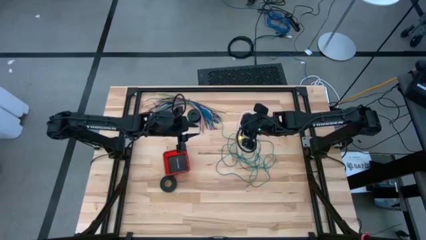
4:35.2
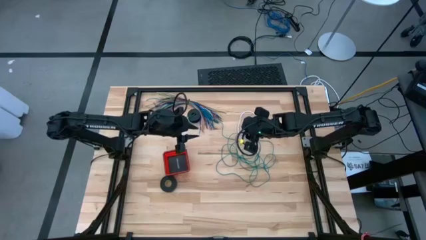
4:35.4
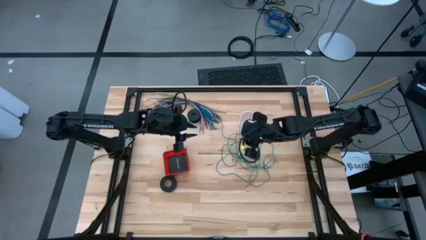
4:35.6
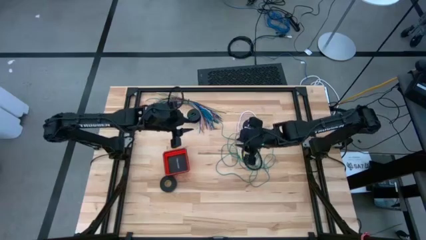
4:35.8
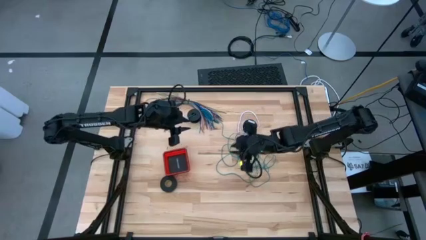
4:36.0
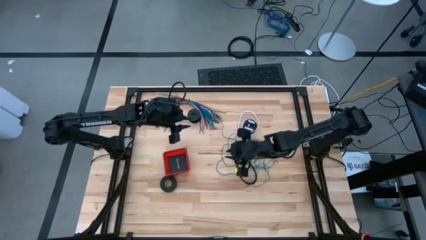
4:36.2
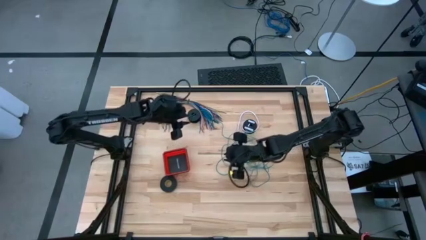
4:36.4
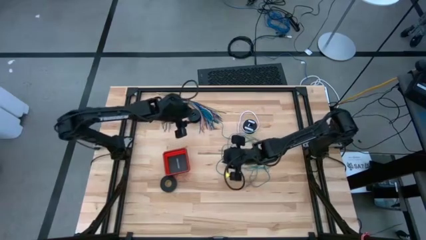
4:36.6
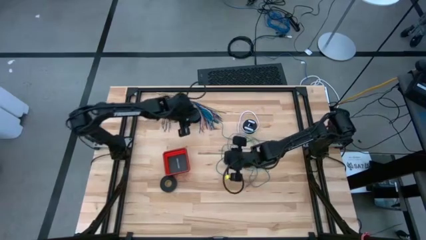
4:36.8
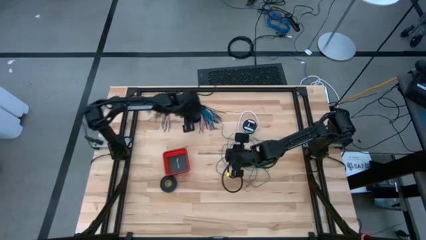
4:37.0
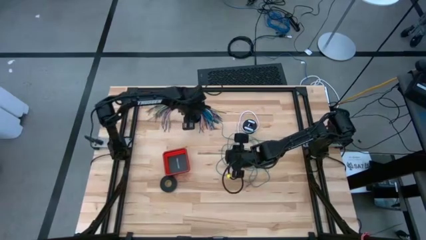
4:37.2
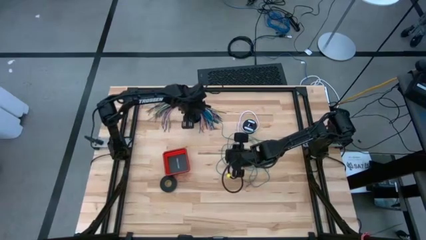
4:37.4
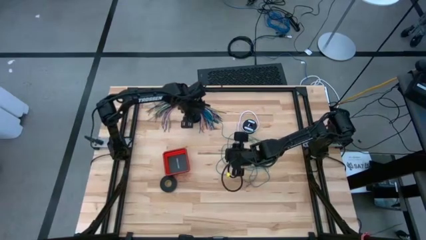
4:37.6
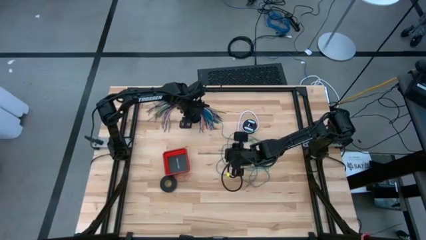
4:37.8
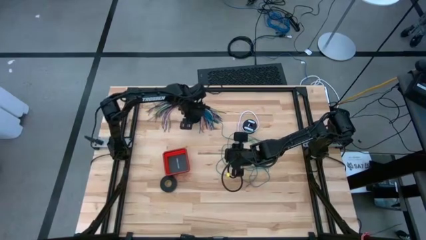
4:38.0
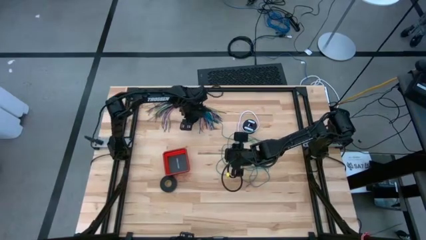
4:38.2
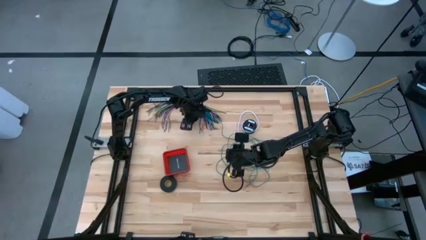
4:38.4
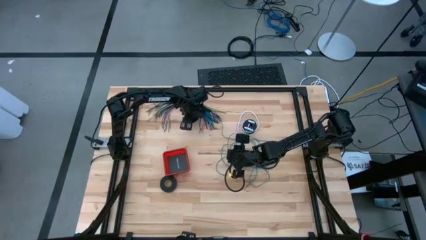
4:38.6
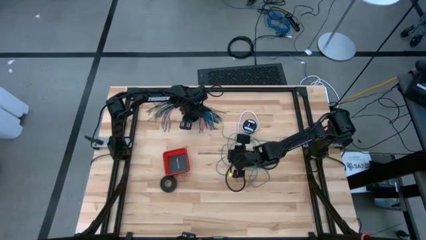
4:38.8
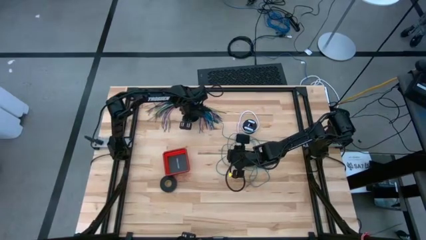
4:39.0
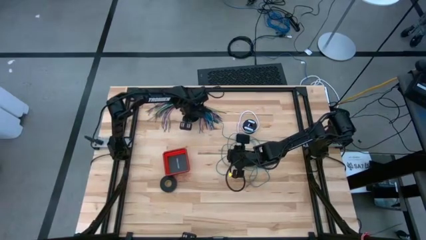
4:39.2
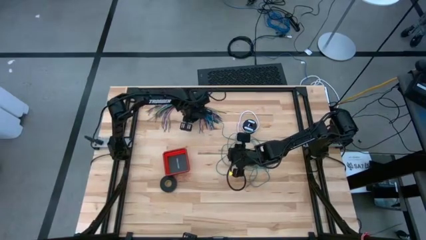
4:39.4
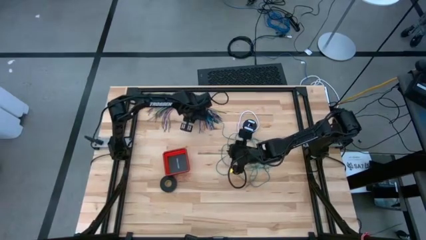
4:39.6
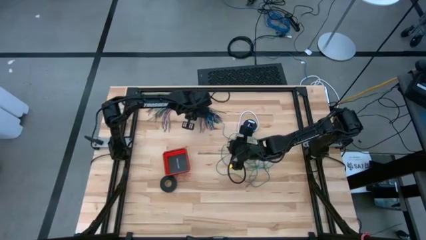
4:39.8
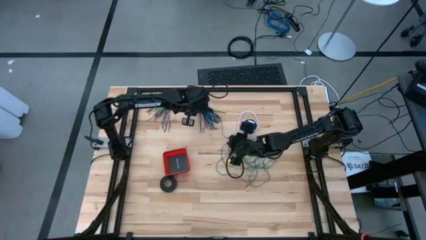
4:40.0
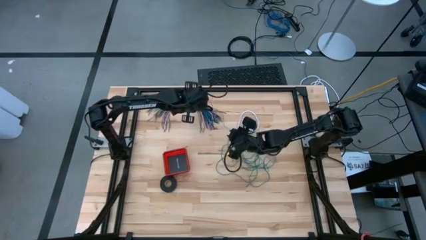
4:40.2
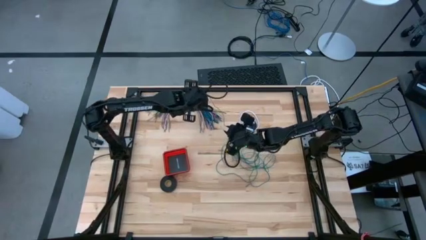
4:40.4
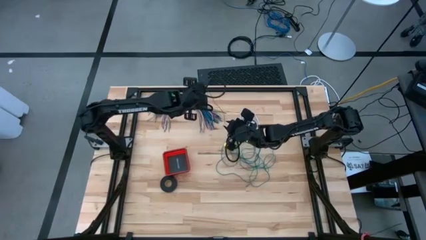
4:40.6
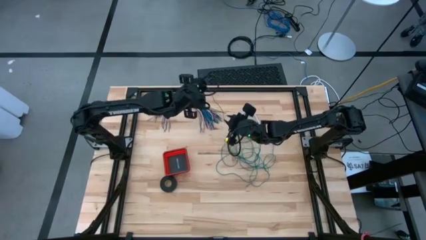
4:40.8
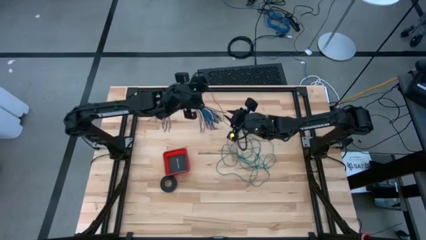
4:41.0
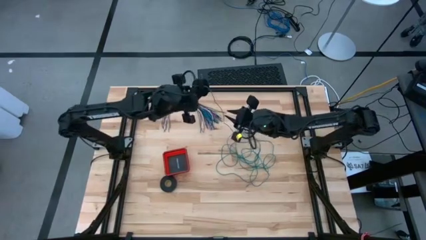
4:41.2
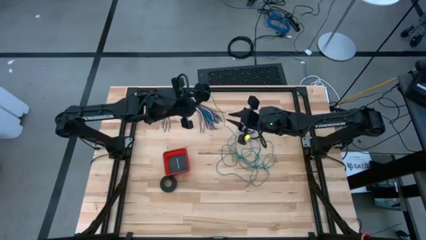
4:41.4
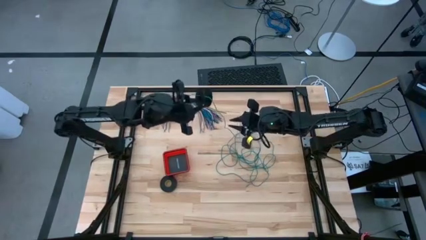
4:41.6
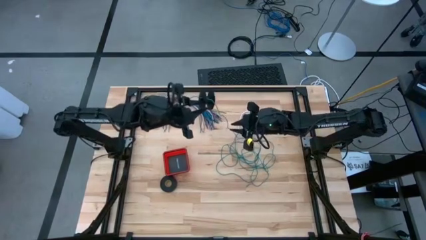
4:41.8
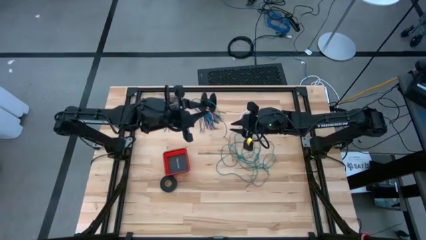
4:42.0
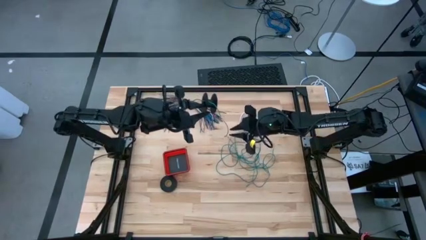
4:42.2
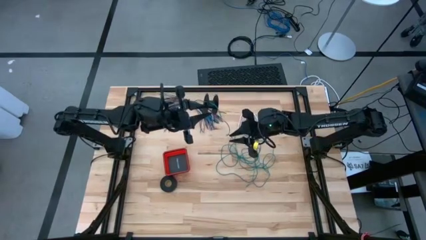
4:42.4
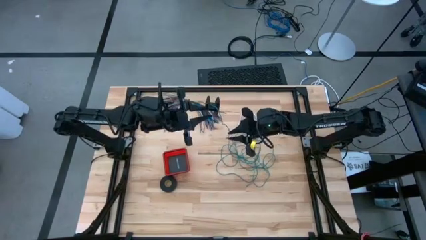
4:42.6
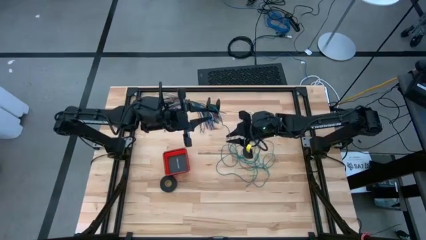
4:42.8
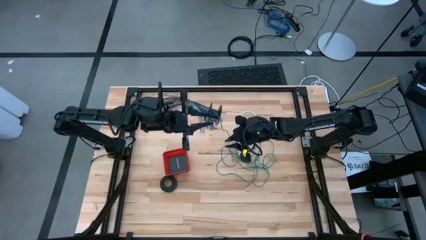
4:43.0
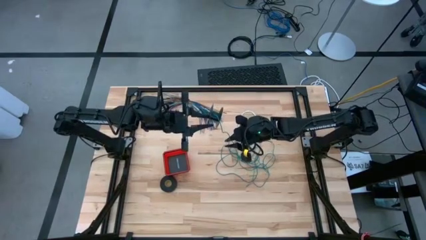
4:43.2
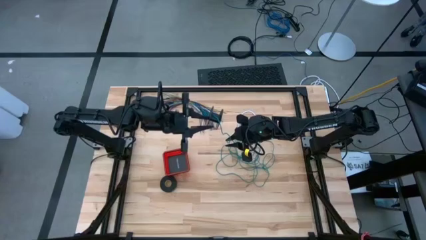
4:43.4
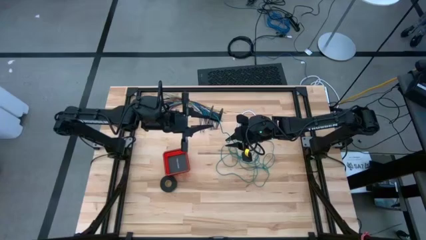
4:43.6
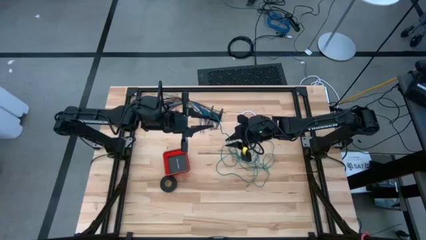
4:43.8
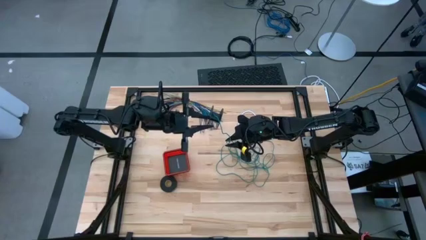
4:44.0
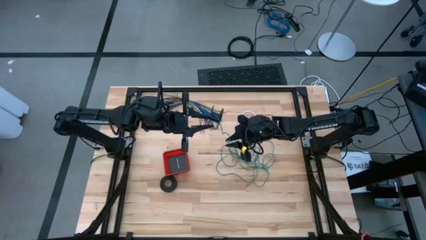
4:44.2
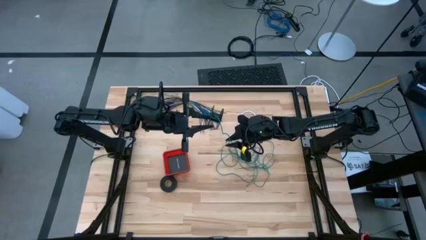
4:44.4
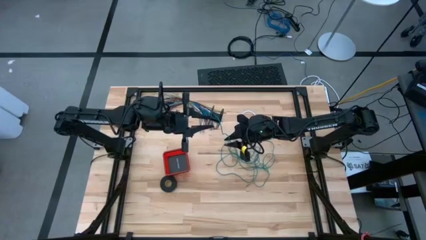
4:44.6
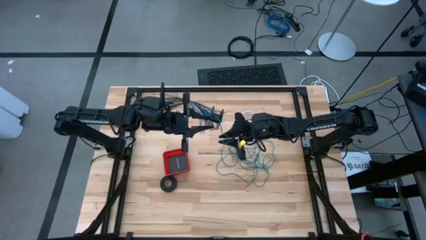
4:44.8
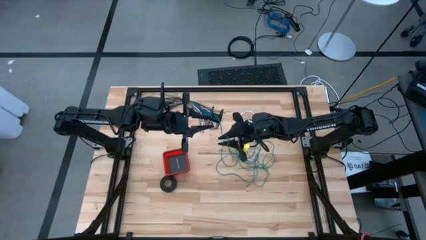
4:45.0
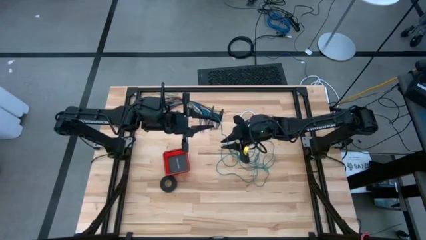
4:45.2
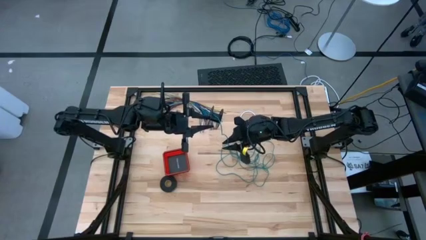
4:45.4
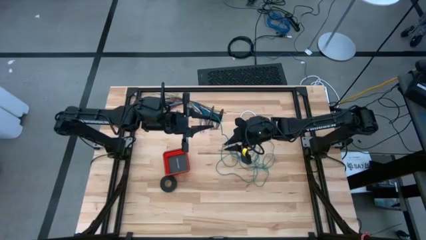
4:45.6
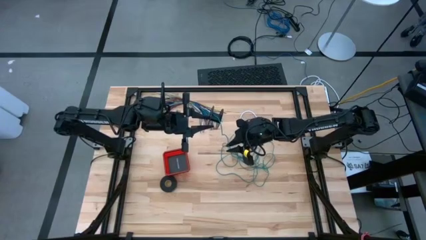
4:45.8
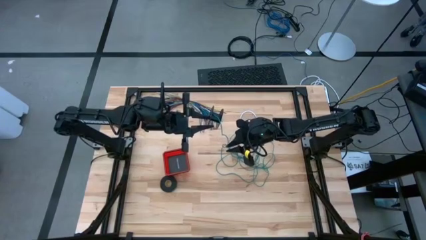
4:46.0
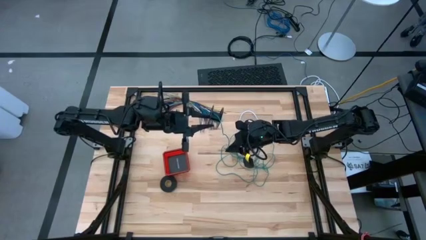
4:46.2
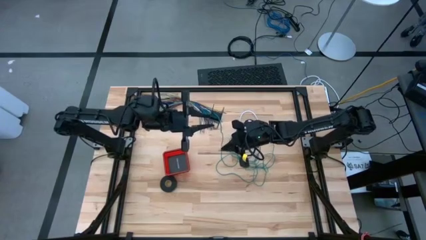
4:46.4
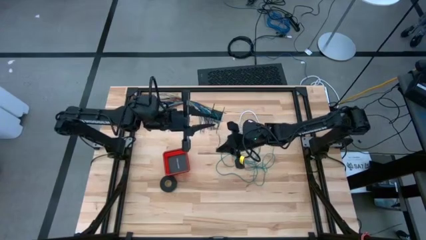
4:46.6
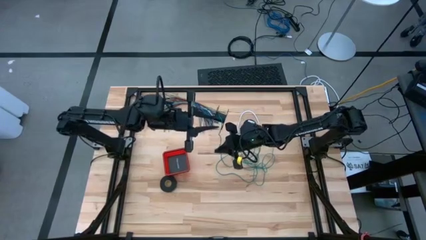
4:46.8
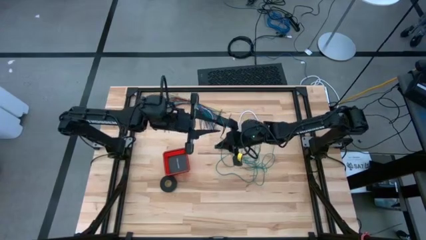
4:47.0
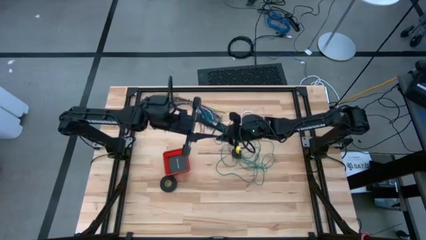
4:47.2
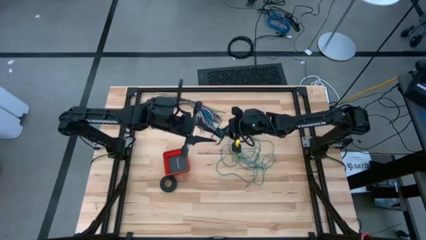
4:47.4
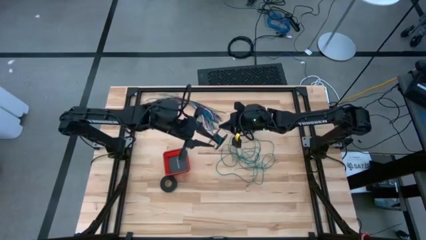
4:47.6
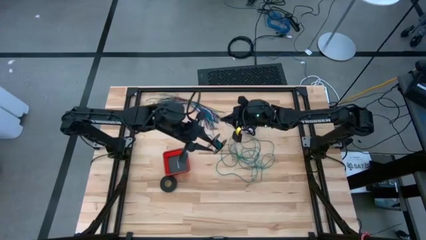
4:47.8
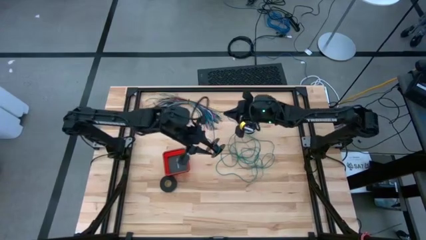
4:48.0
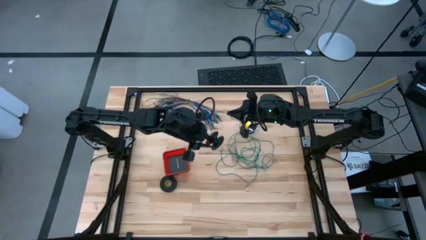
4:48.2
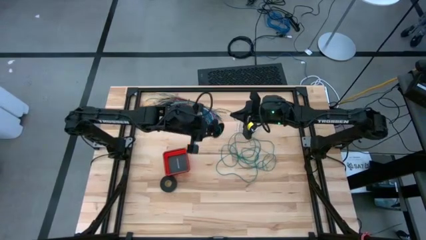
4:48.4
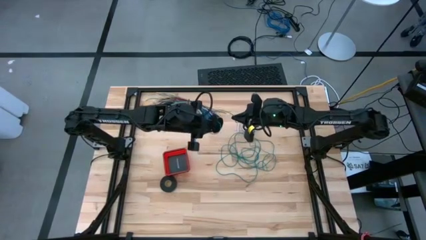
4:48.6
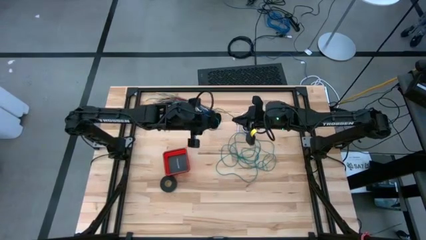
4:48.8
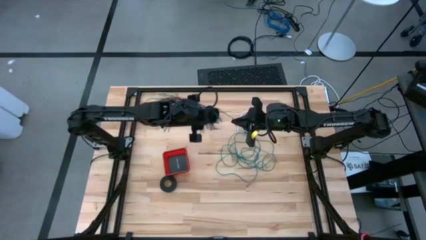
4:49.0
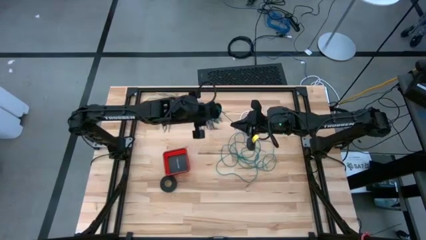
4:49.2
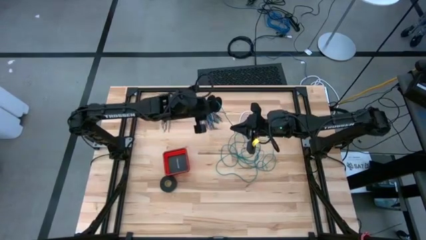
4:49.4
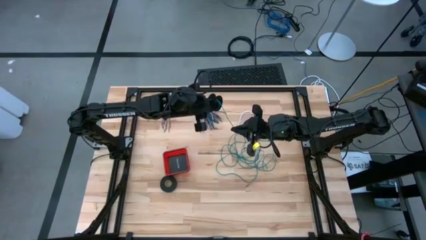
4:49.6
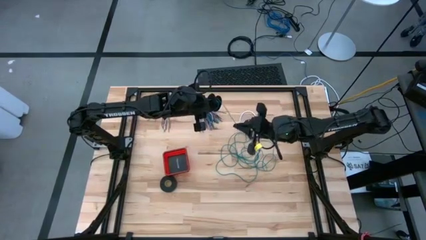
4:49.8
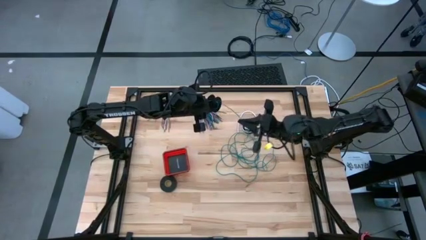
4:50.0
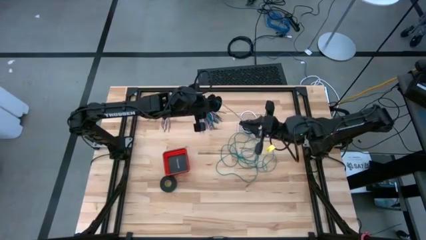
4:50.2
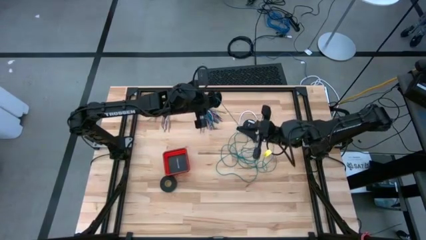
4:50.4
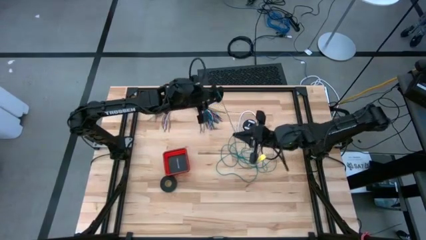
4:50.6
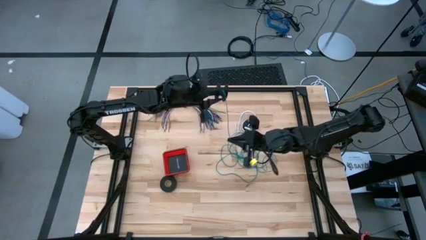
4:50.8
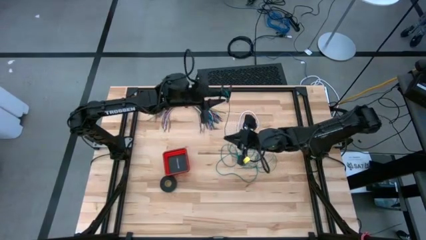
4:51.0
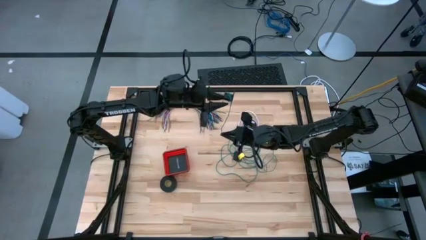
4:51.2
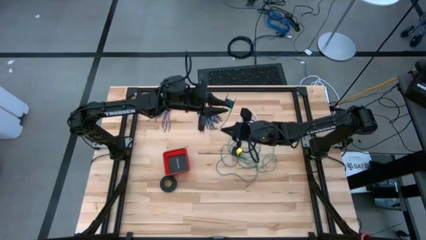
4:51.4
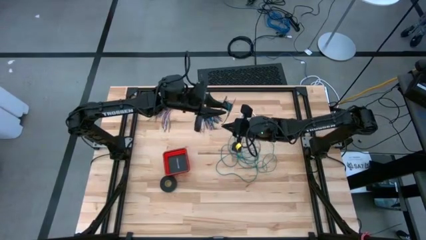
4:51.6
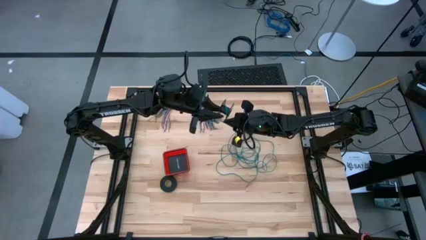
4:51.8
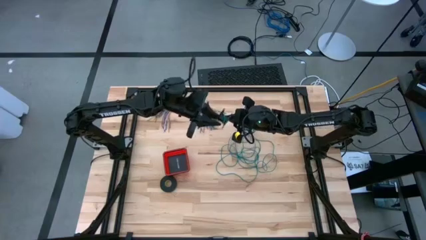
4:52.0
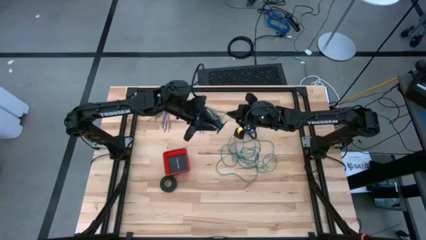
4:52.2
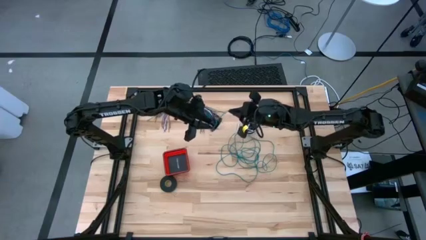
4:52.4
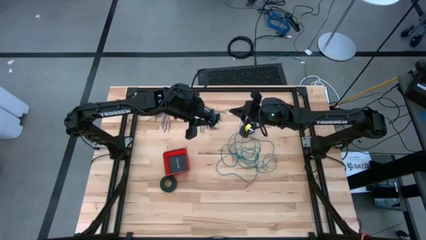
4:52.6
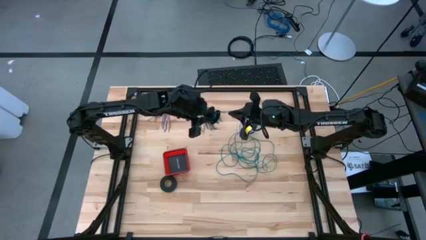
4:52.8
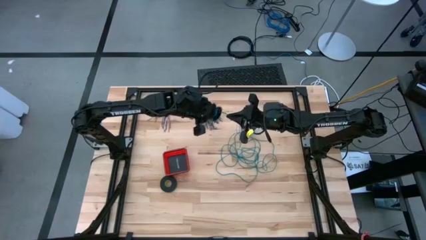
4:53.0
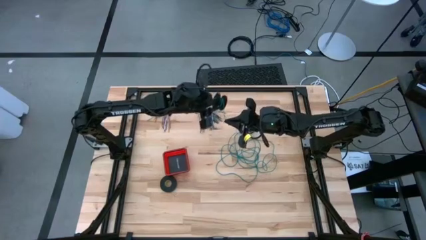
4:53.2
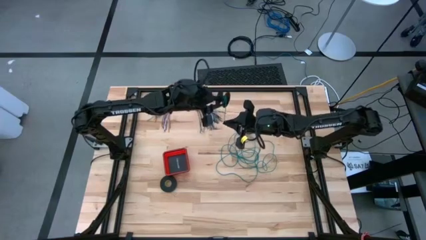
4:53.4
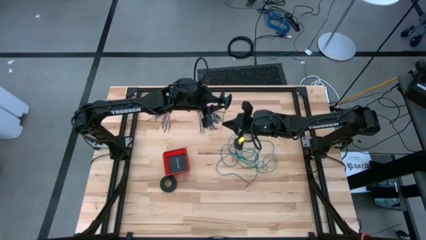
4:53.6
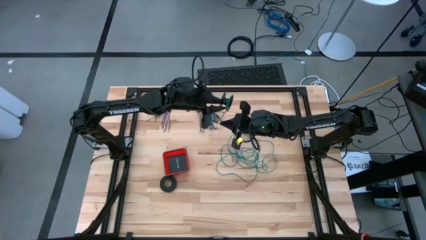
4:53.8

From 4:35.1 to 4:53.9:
Task: Coil cords
Coil the green wire onto the spool
